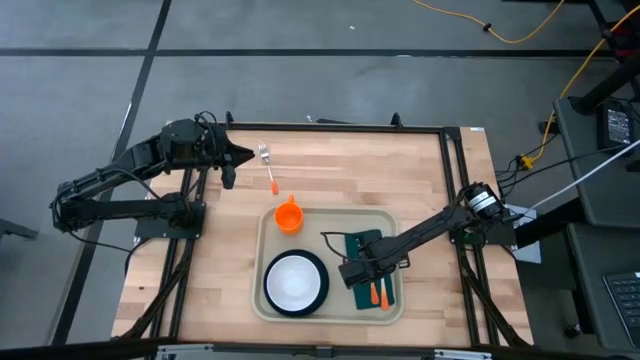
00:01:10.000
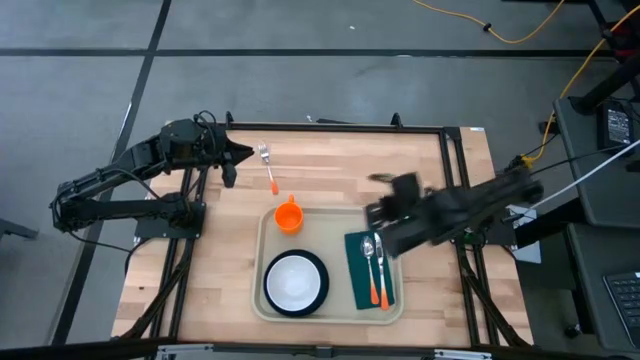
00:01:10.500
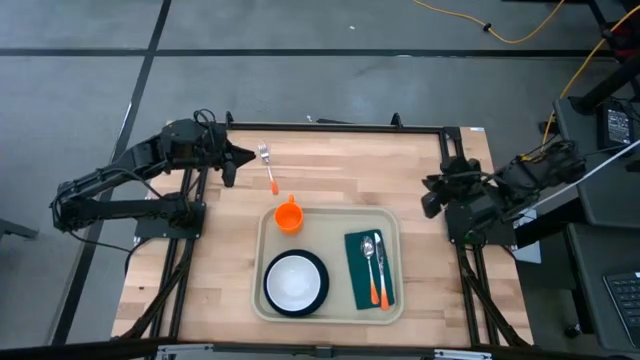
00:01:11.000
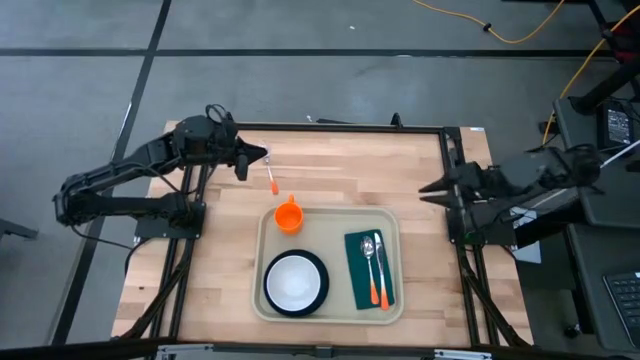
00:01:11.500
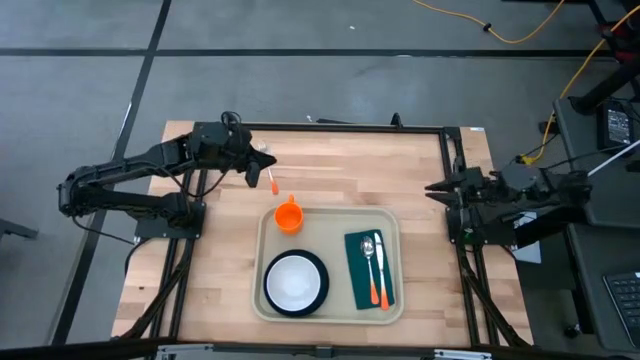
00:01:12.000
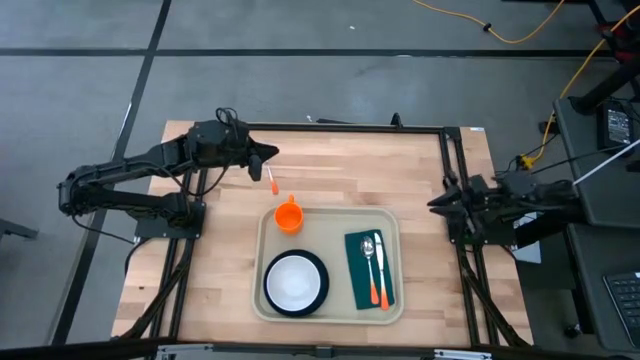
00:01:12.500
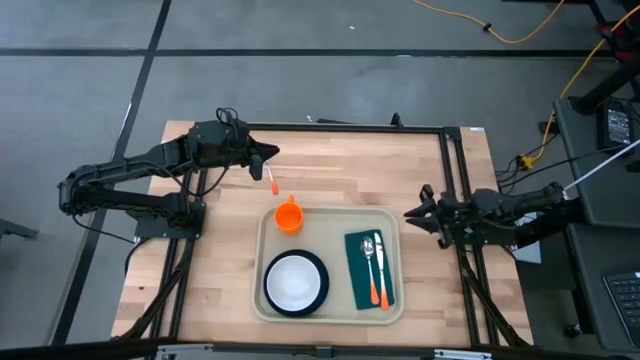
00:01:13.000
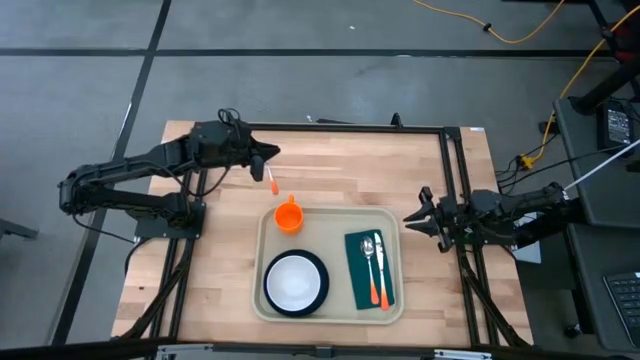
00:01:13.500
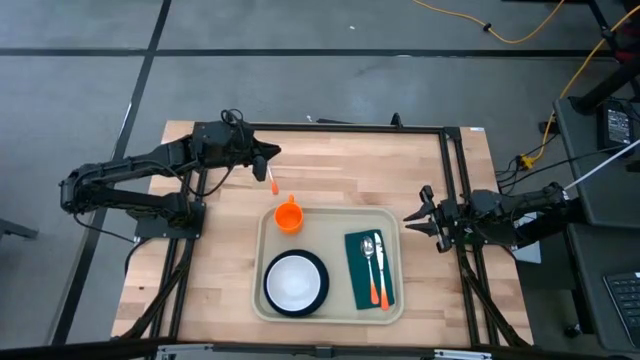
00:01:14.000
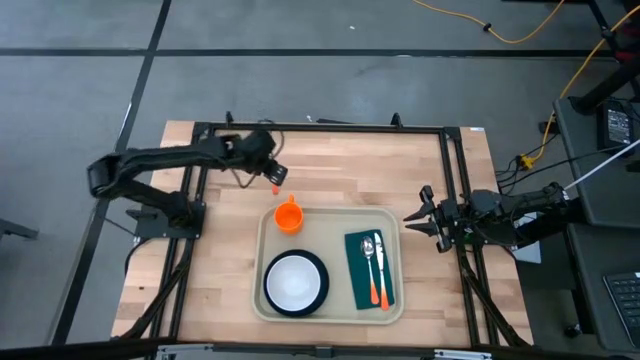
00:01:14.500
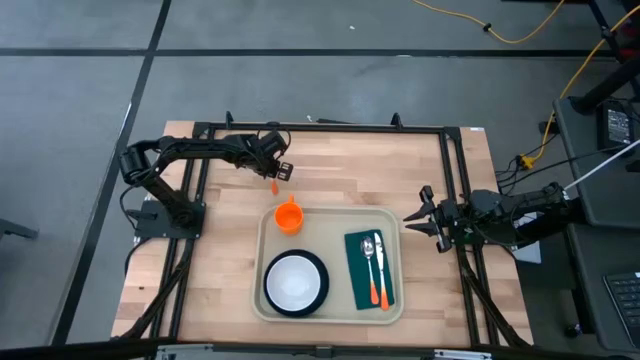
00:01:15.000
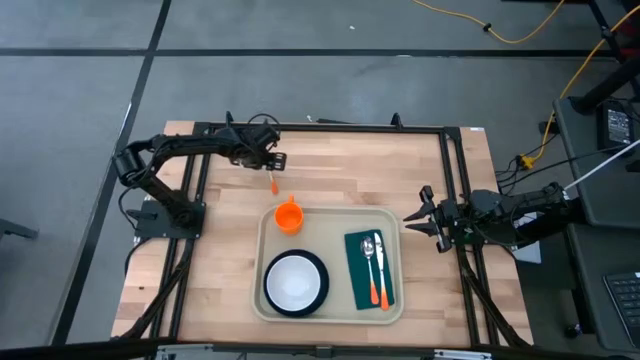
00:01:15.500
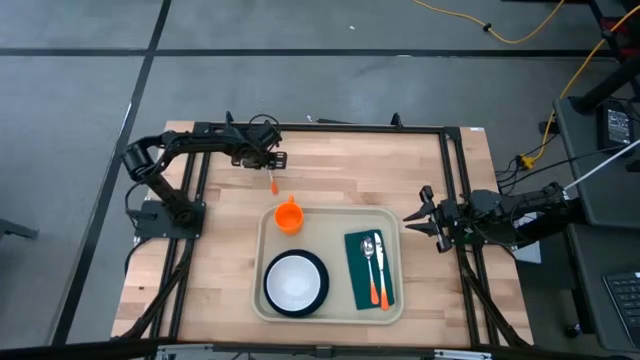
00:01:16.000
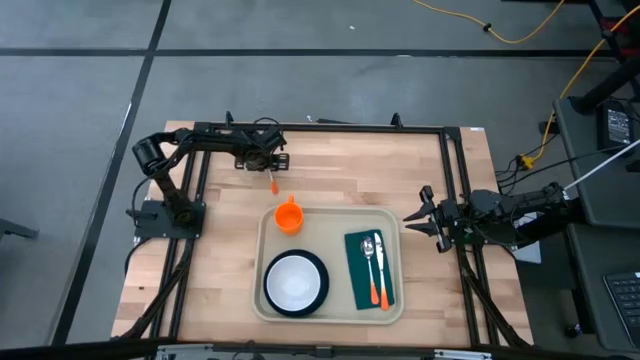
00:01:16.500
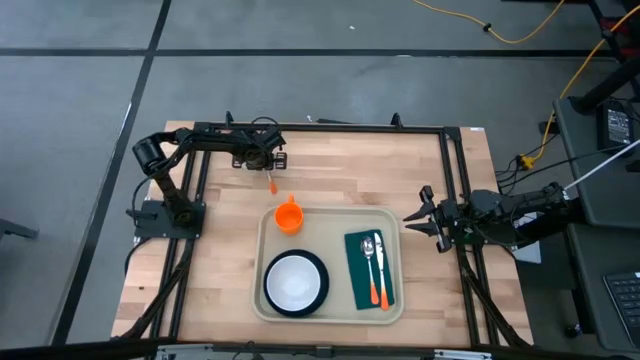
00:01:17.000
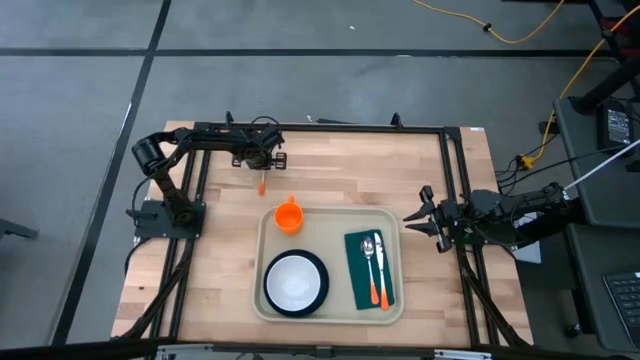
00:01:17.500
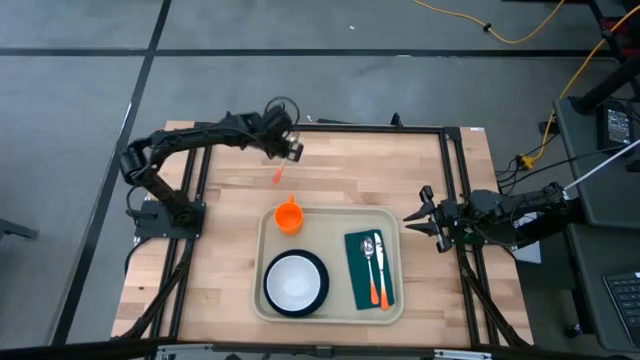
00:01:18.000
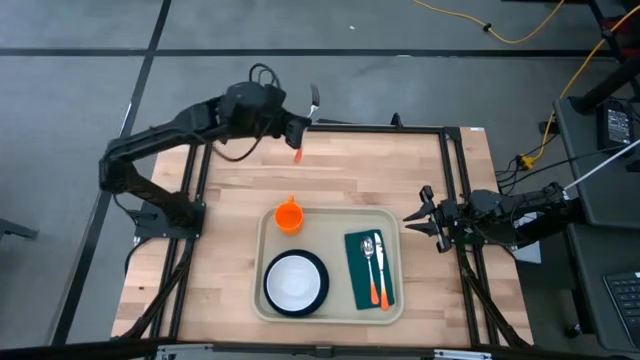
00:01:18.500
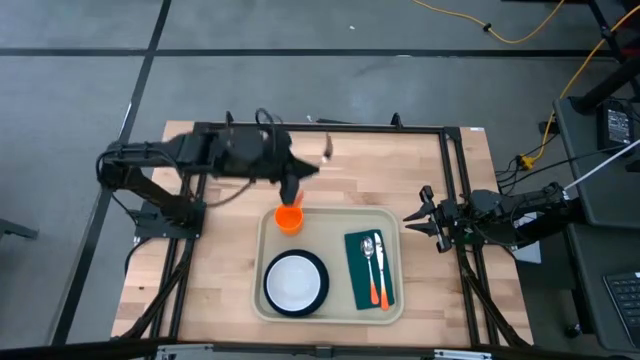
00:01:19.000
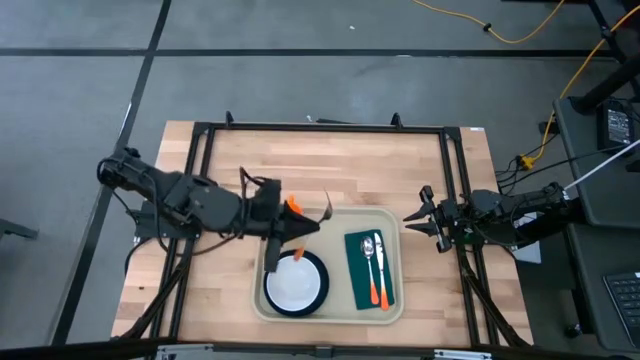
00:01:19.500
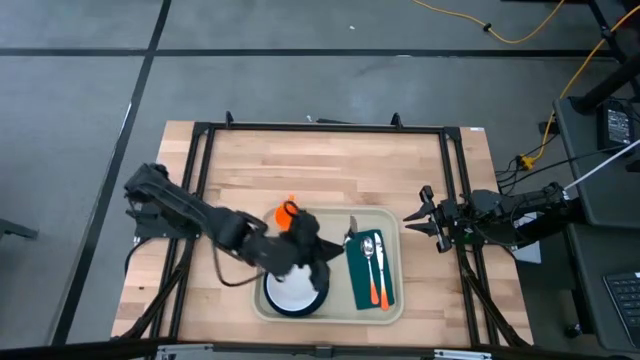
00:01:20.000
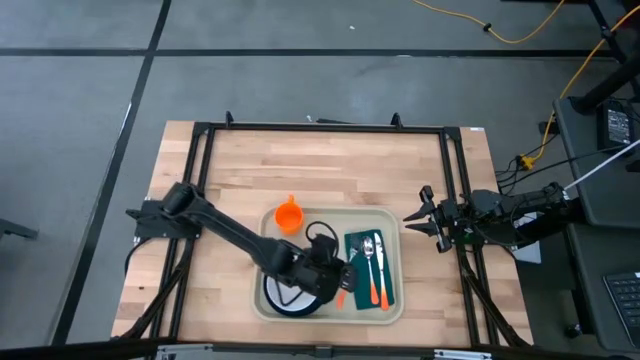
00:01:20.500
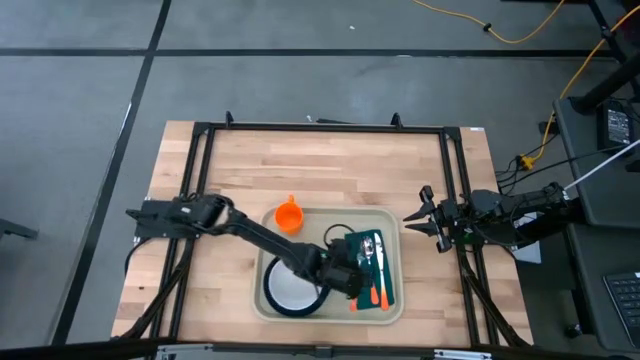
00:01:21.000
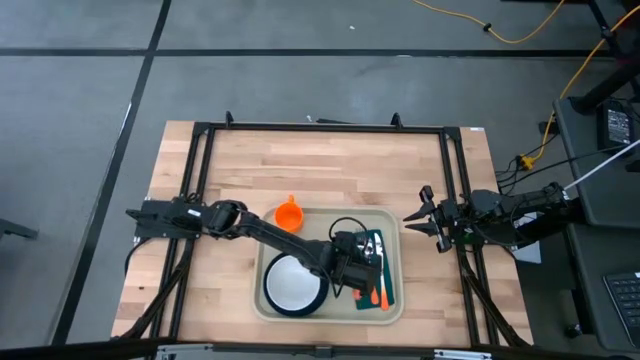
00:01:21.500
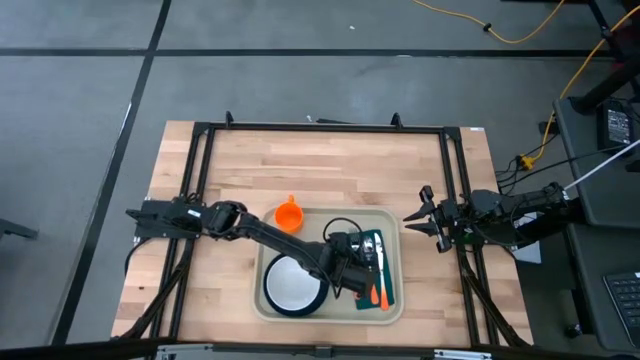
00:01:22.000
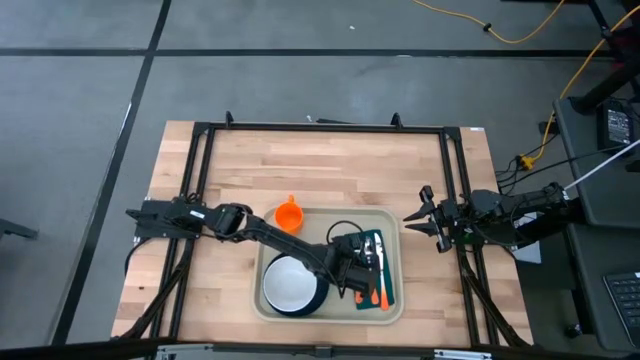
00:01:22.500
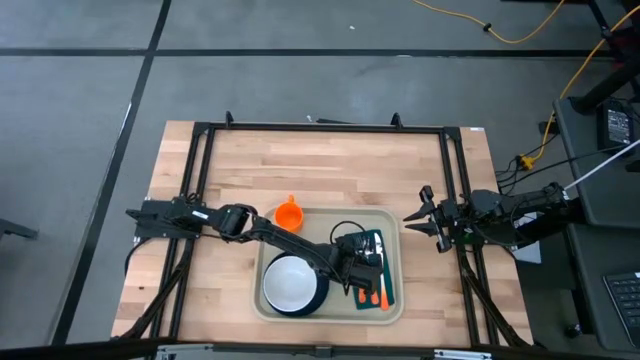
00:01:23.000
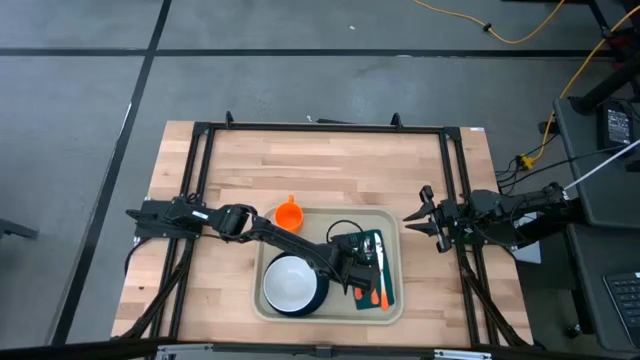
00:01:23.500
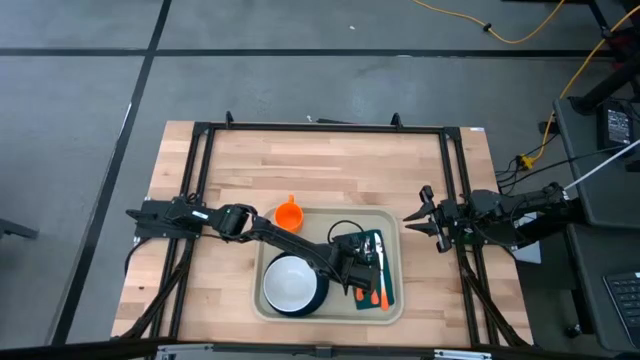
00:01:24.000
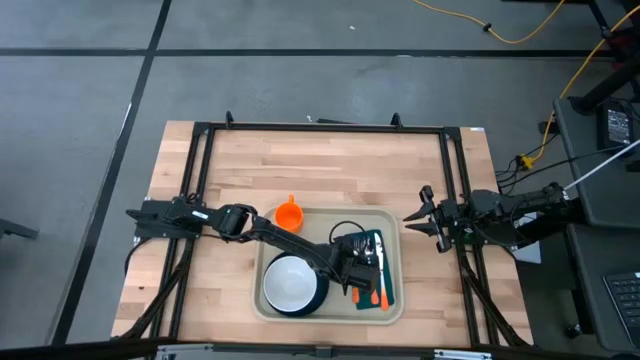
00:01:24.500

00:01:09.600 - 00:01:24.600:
Task: Set up tray
Put the orange fork on top of the green table napkin to the left of the orange spoon

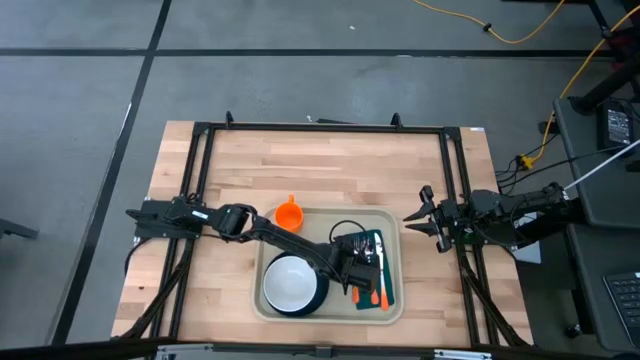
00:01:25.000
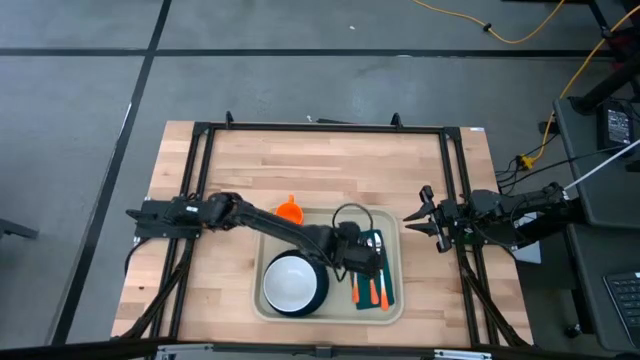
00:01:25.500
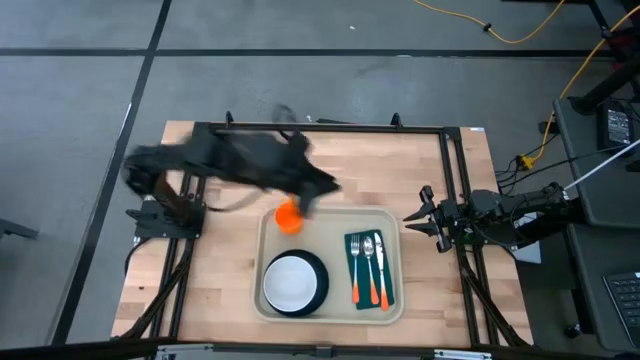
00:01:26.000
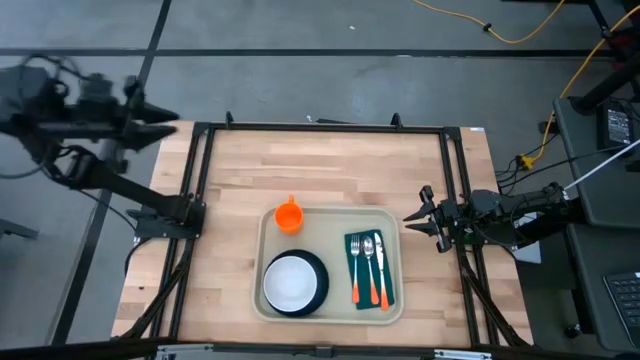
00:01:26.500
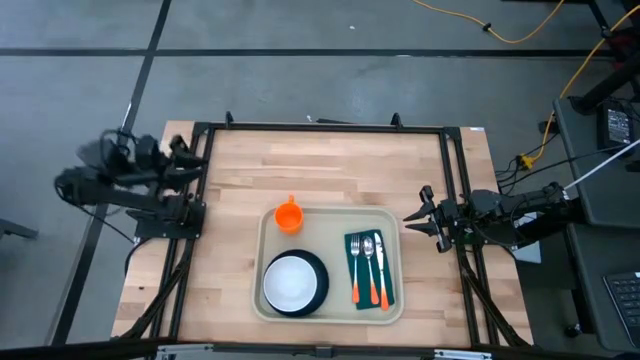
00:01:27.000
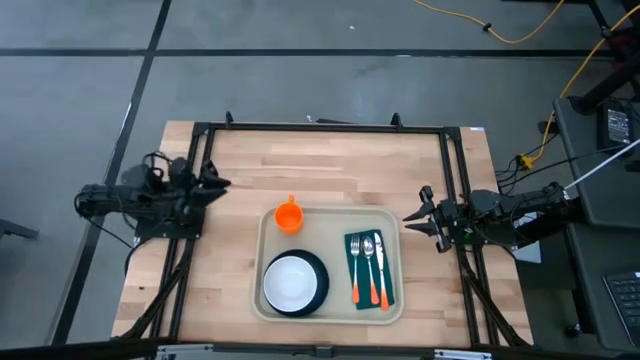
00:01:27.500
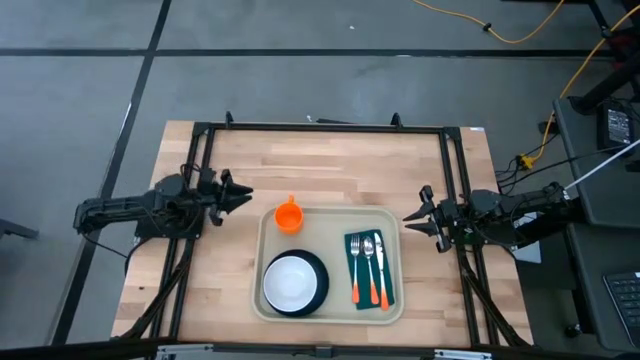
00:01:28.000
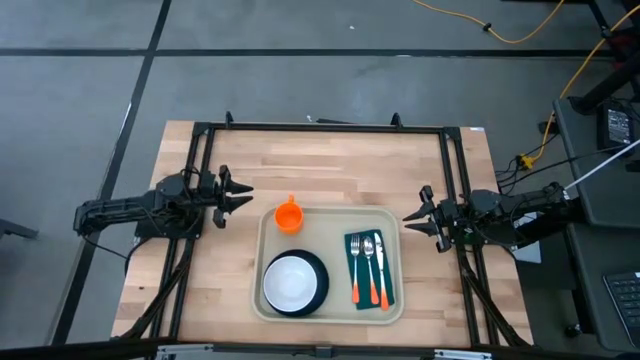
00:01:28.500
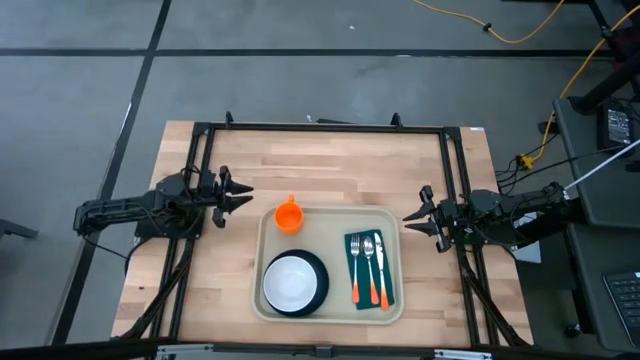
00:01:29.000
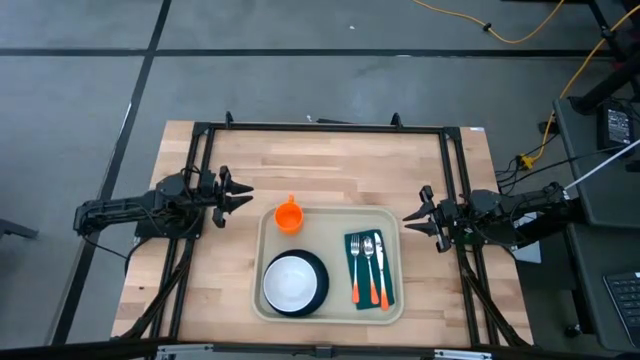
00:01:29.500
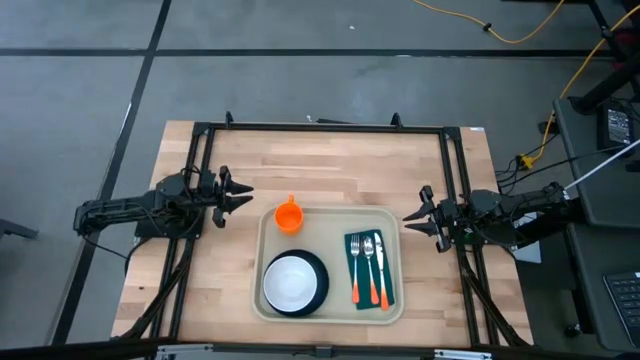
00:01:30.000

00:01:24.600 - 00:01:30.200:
Return to Home Position
